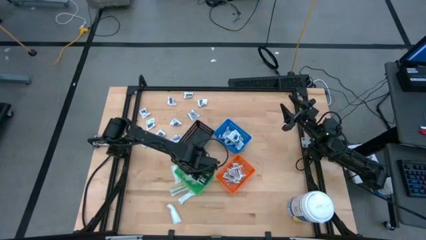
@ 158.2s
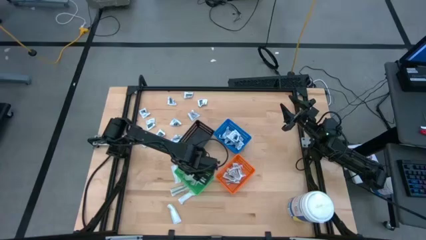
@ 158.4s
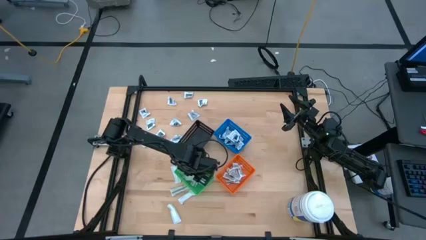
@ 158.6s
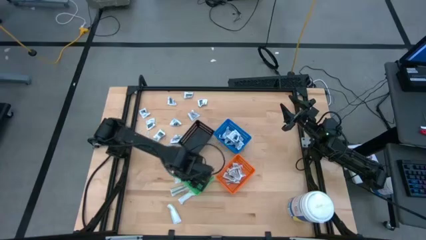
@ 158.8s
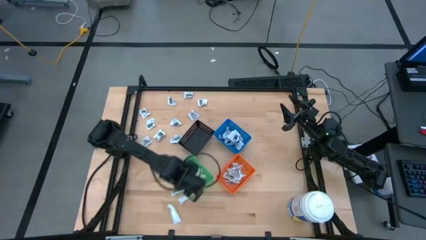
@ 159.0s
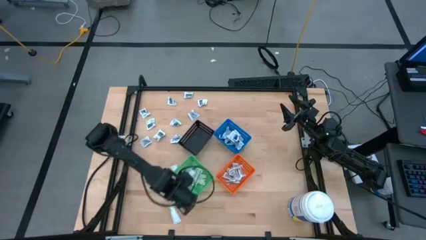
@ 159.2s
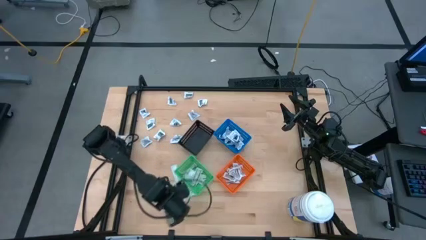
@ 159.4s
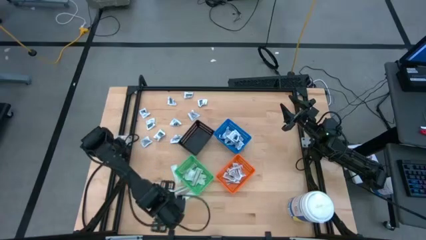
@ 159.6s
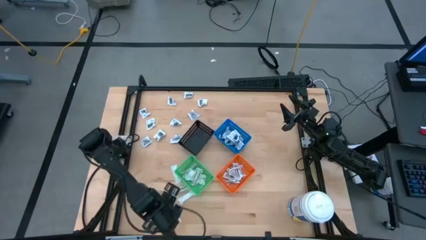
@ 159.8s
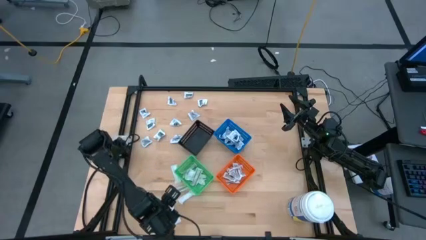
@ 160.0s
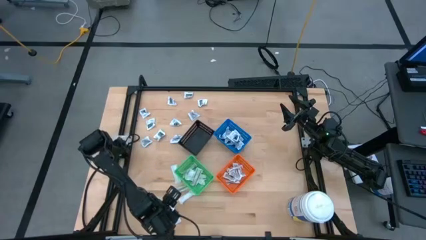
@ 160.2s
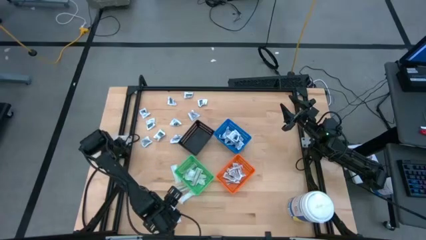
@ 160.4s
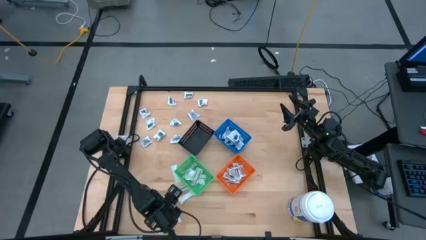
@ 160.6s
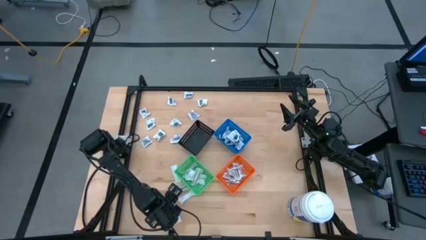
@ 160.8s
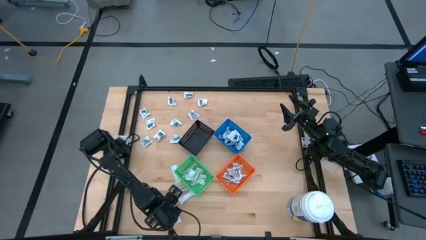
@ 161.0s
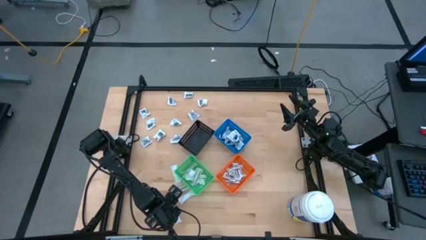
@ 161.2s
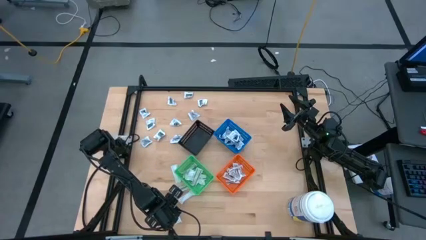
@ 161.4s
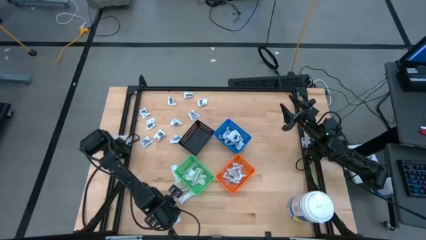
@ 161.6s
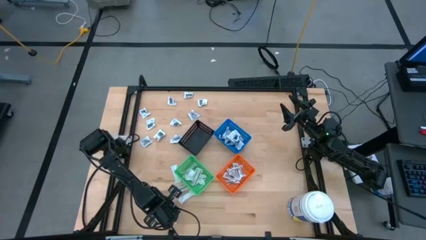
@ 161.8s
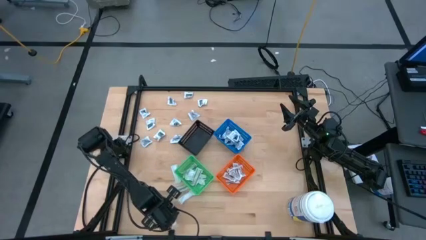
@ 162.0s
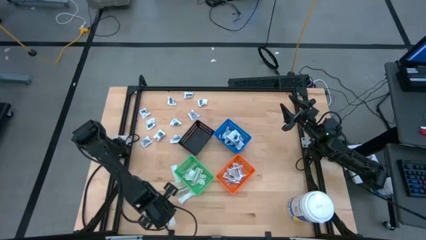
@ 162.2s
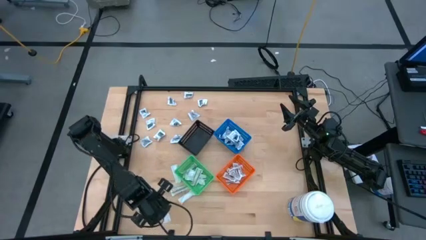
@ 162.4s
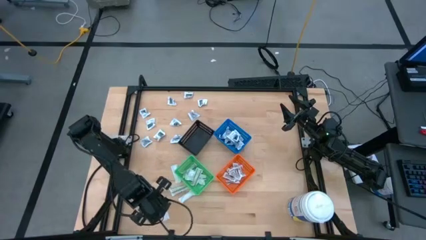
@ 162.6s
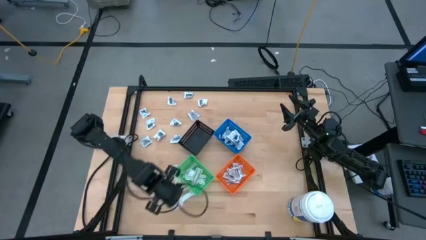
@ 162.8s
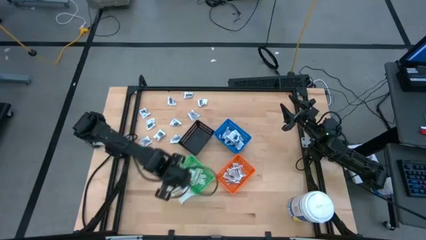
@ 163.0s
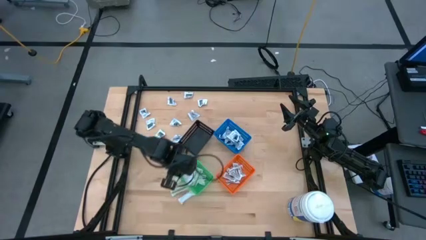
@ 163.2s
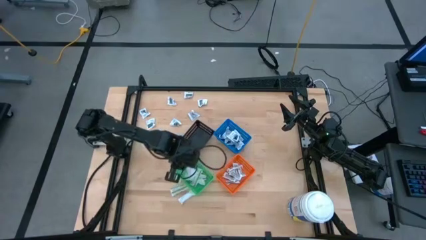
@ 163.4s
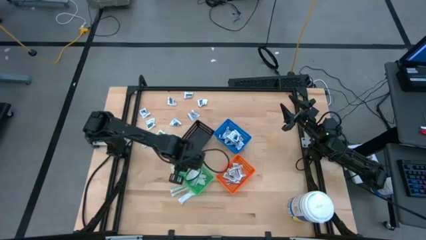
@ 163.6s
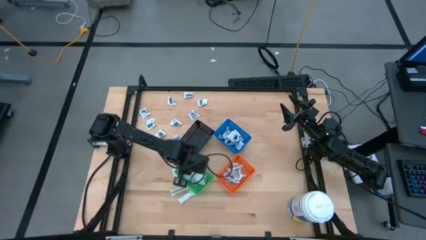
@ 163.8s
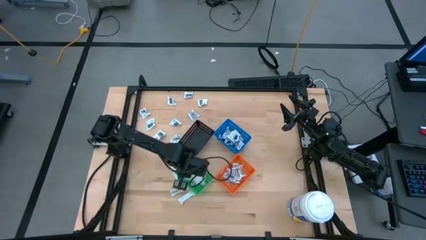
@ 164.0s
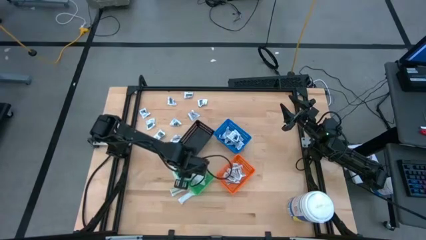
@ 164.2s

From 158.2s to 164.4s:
Task: Pick & Place First Aid Supplies
Put the green bandage into the green bin

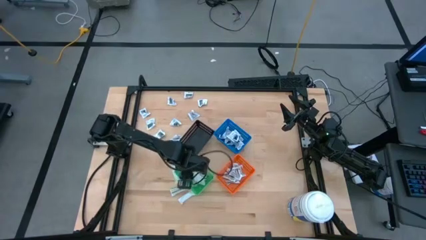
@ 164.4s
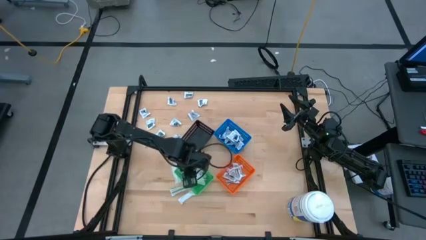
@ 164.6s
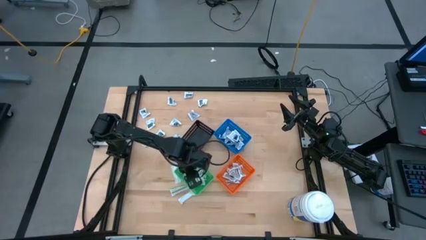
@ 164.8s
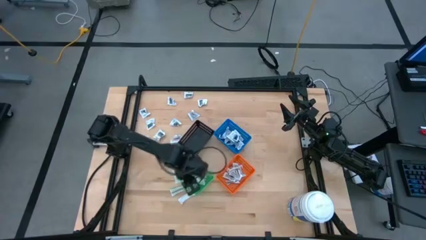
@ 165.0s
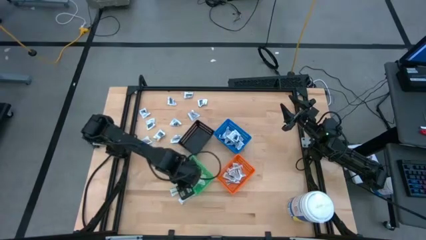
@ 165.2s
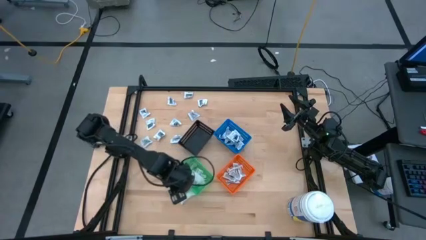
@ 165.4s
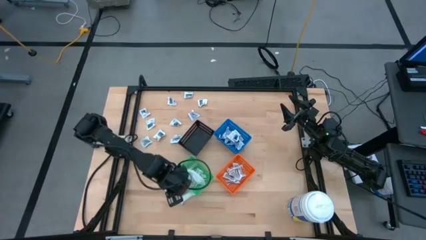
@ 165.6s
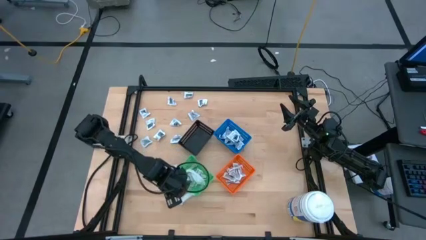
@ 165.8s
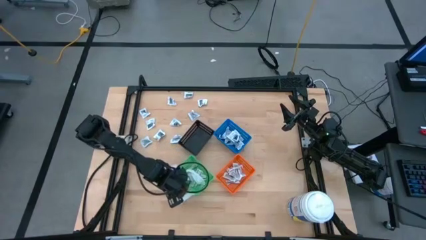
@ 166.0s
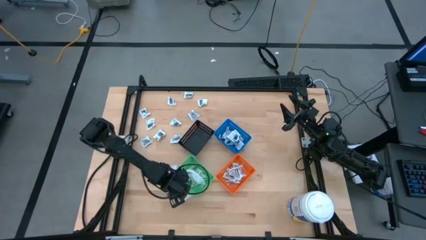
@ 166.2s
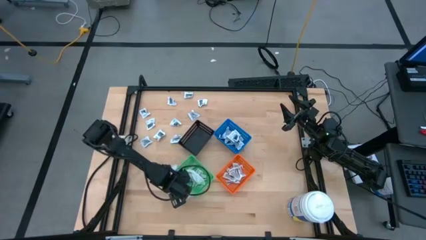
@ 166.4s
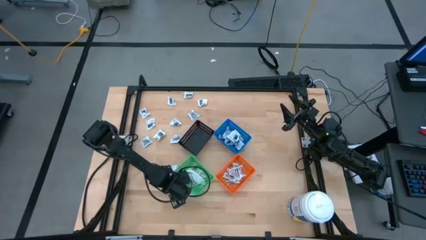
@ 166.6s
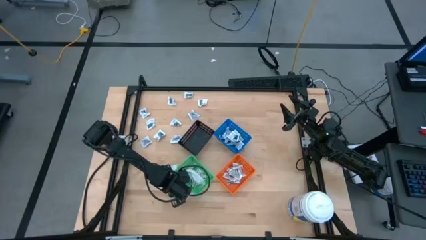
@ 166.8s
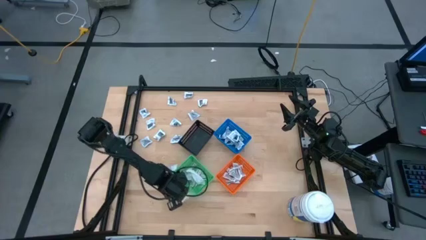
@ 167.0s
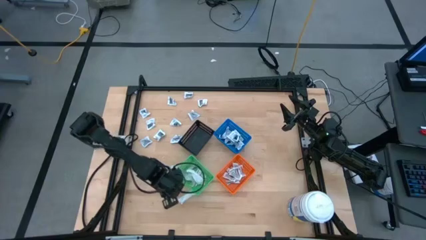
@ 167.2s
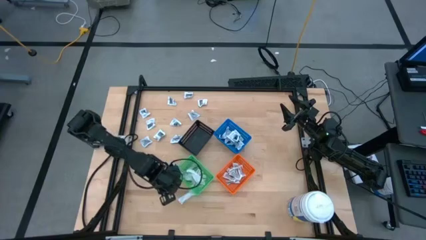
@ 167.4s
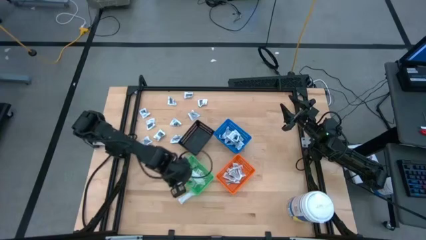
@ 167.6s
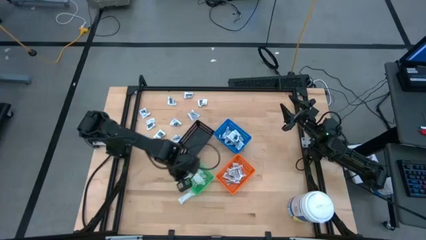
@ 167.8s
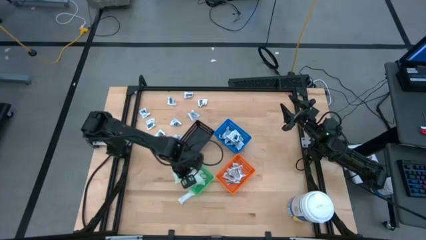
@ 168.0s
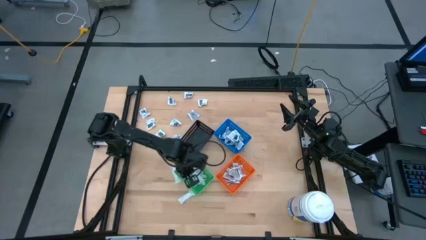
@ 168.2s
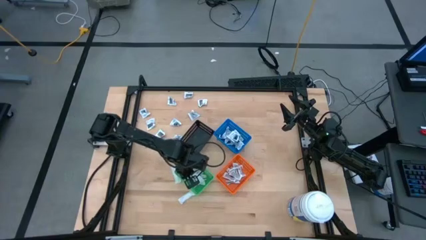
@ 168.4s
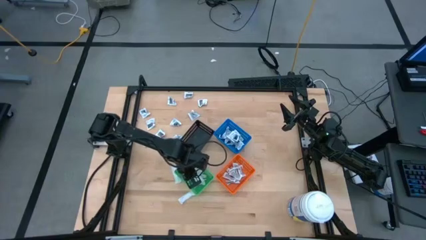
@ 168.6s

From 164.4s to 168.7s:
Put the green bandage into the green bin

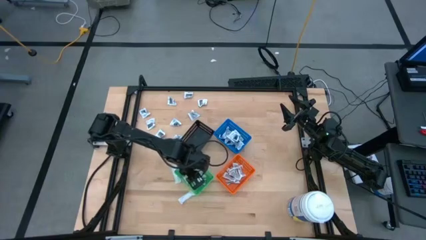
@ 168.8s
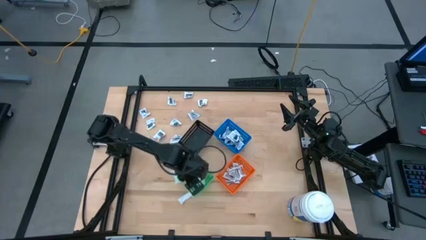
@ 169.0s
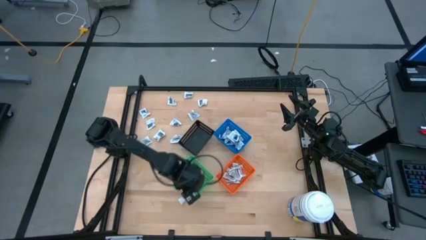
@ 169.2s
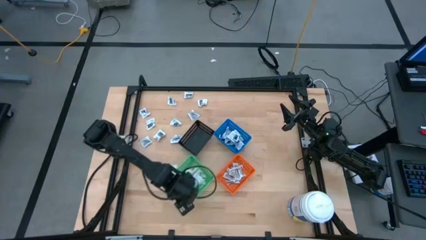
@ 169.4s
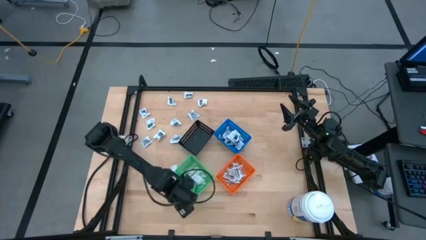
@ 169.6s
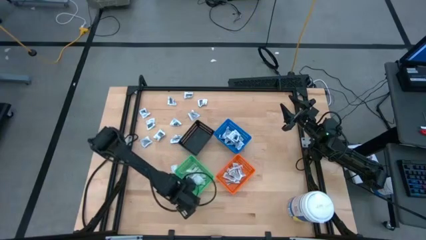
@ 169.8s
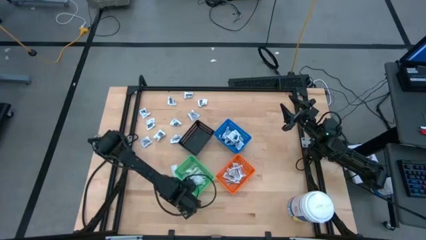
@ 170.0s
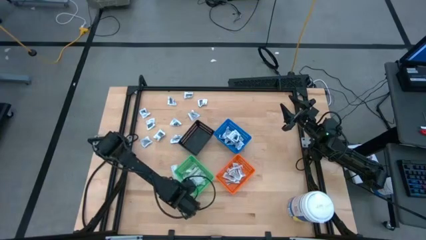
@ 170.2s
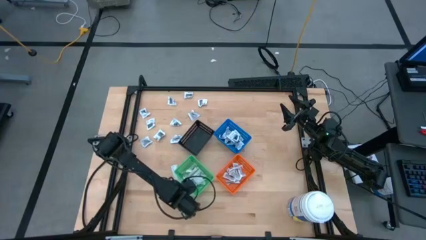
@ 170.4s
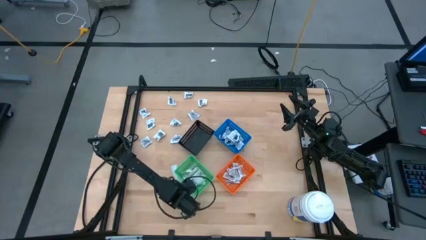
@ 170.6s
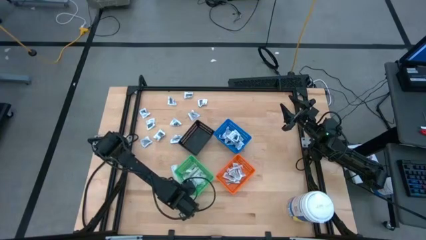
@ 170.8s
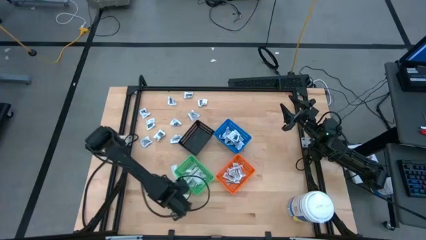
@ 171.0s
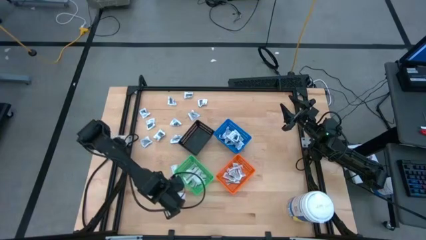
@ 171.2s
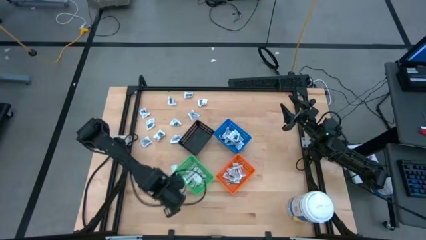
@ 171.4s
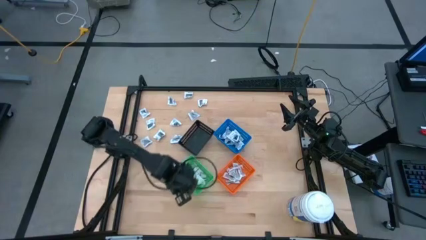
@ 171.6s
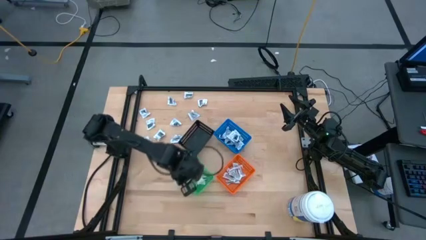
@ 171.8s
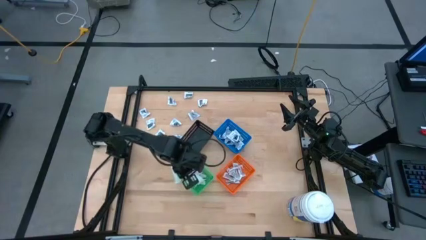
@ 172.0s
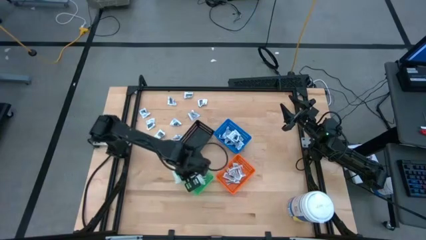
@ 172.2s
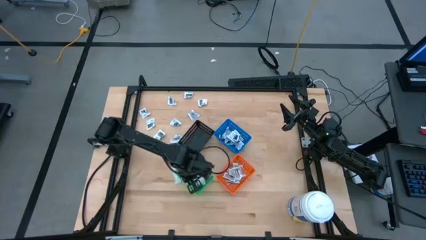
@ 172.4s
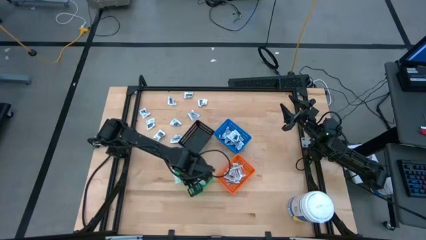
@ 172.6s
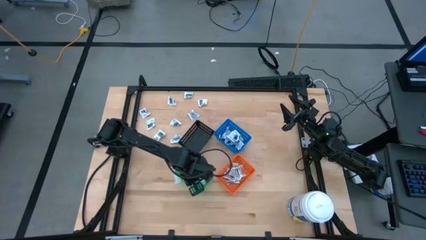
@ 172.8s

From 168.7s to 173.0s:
Put the green bandage into the green bin

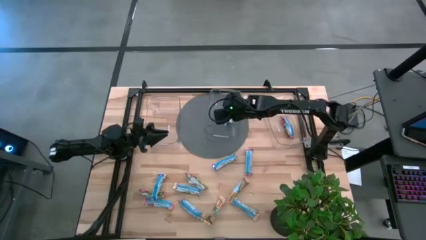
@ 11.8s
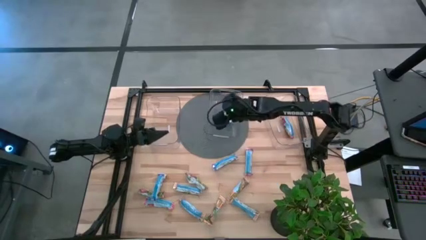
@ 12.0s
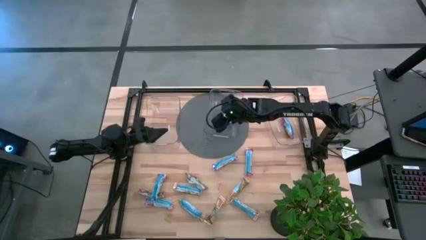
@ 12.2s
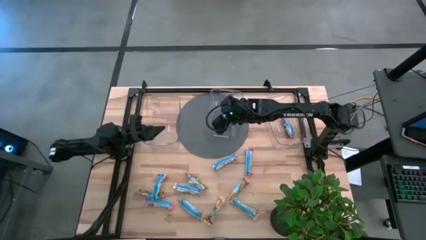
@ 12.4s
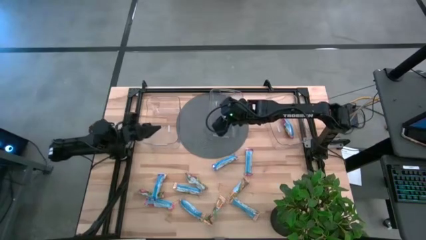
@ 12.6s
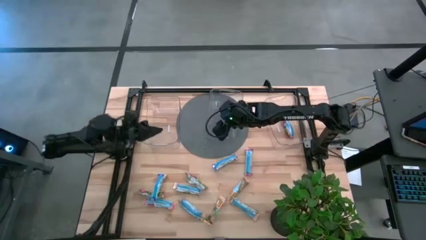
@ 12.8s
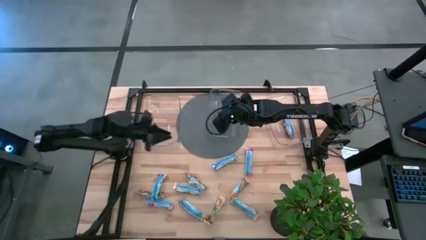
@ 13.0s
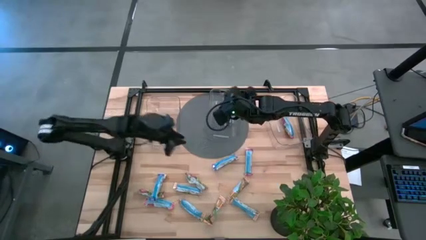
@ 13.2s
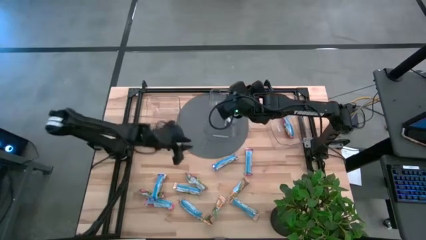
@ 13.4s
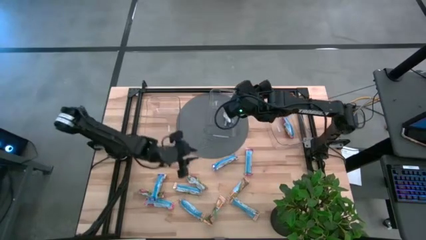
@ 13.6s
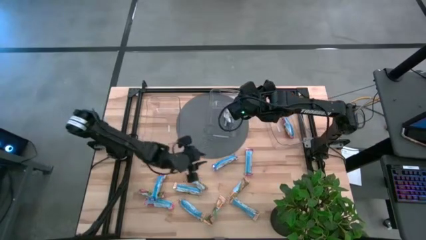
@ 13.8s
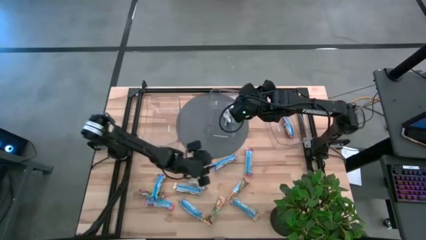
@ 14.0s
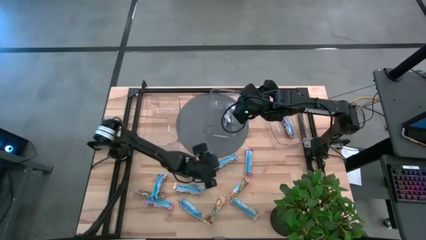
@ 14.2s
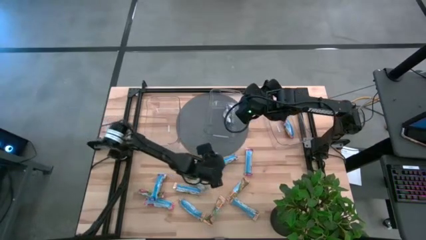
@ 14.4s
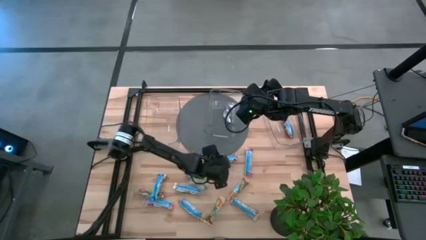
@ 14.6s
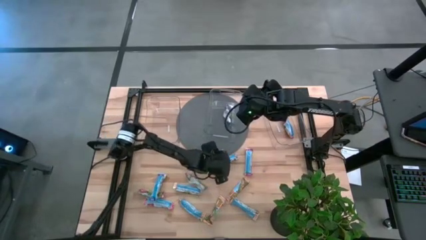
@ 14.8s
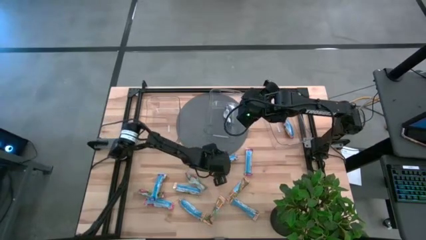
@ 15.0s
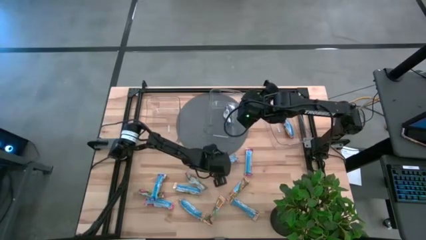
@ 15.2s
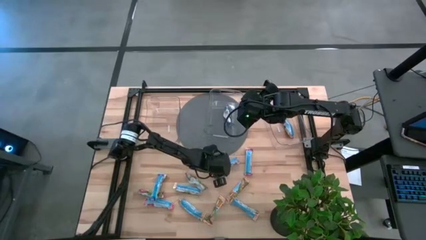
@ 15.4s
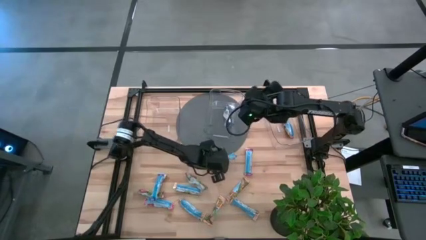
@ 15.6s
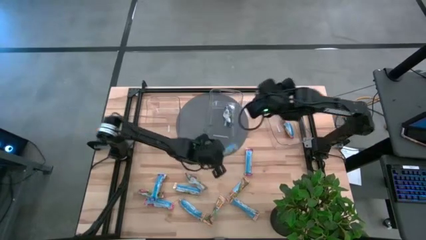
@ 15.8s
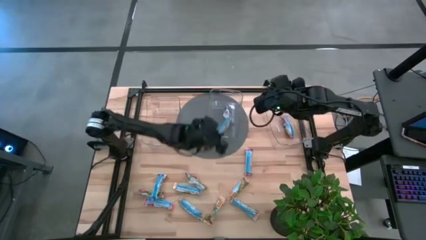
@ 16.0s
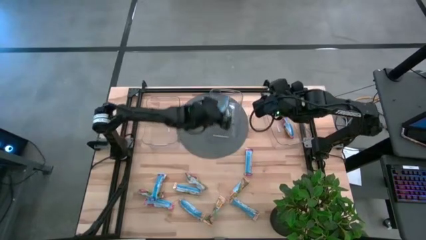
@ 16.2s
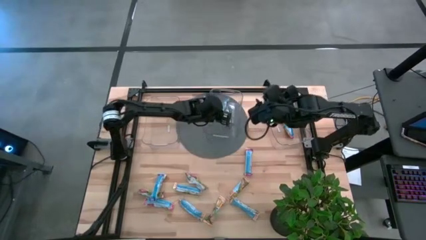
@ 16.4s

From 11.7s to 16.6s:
Task: Pick and place Granola Bars by type
Put the blue granola bar into the middle transparent bin
